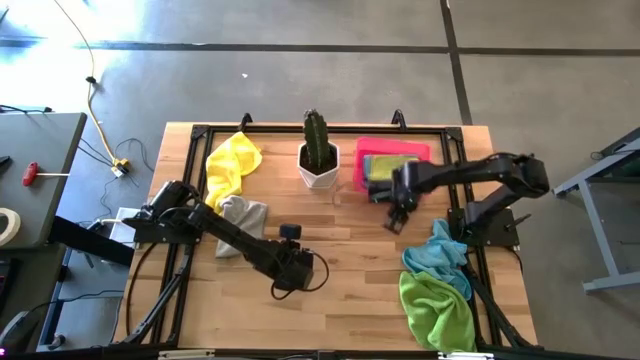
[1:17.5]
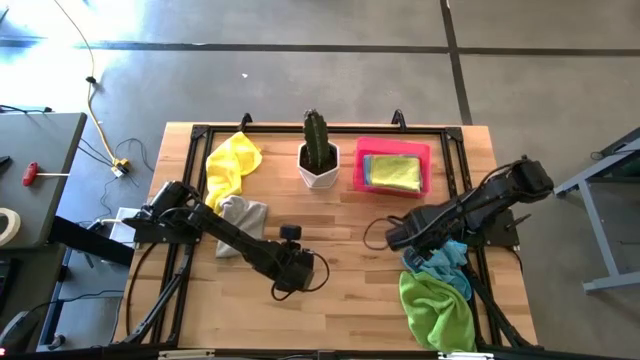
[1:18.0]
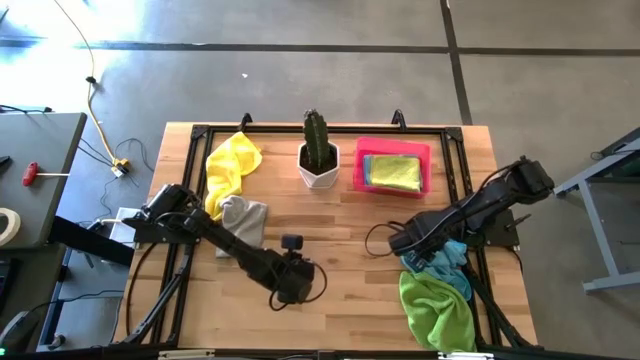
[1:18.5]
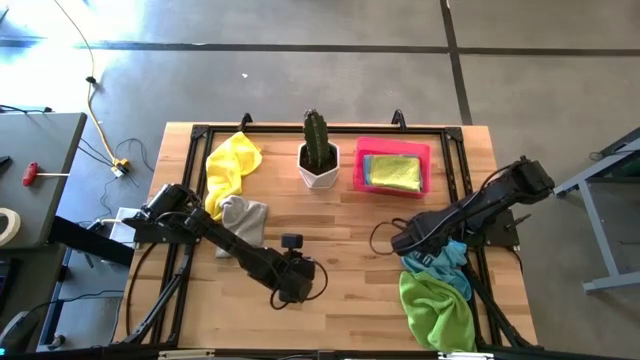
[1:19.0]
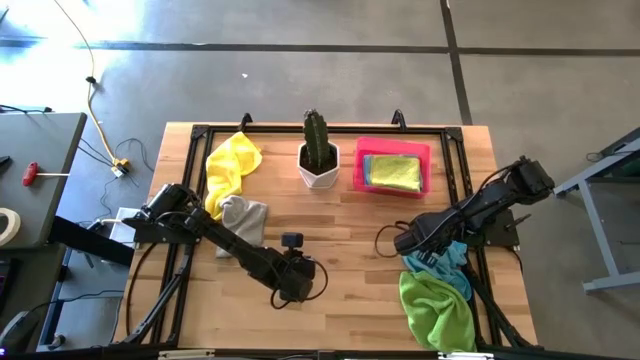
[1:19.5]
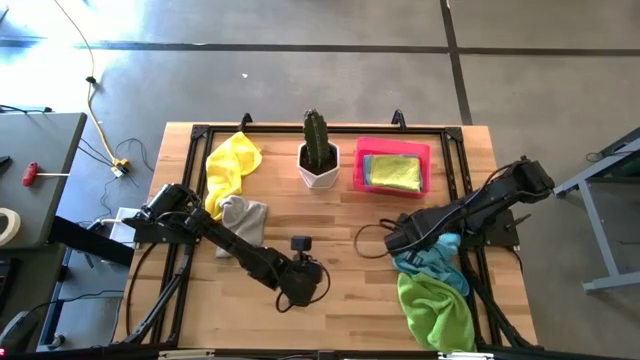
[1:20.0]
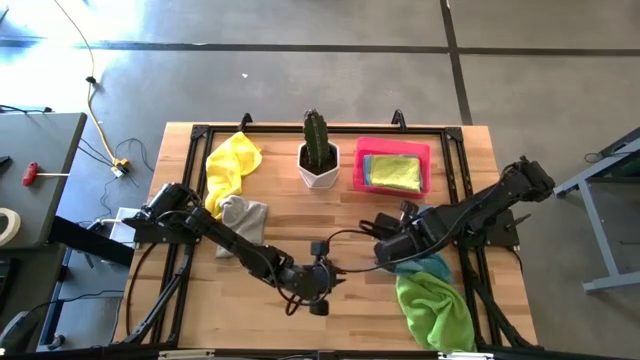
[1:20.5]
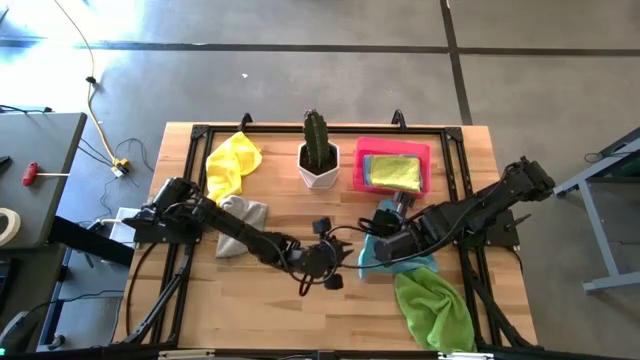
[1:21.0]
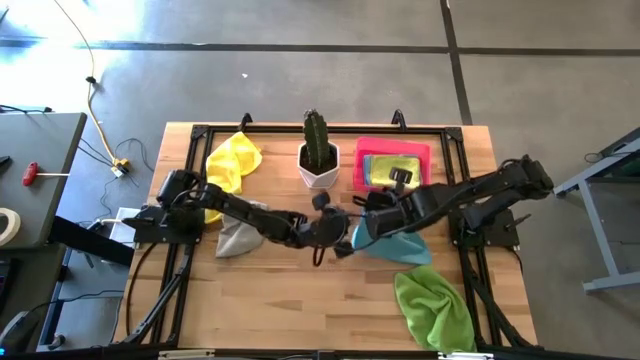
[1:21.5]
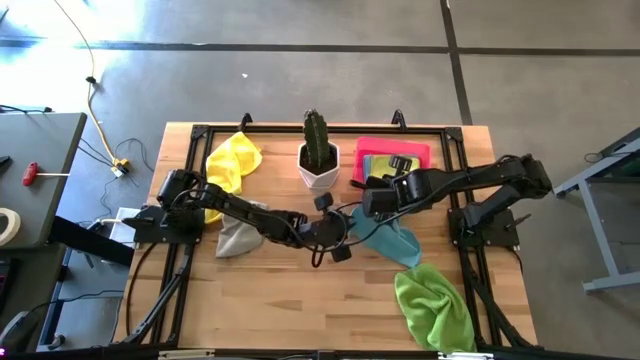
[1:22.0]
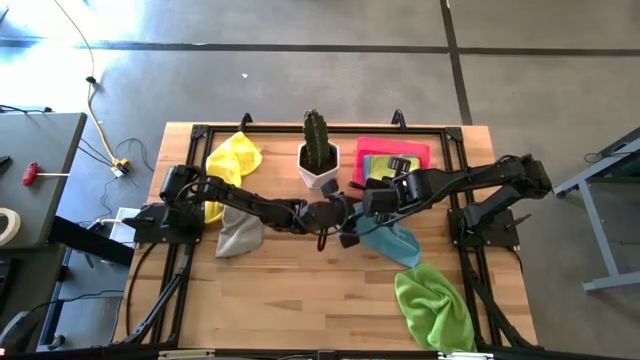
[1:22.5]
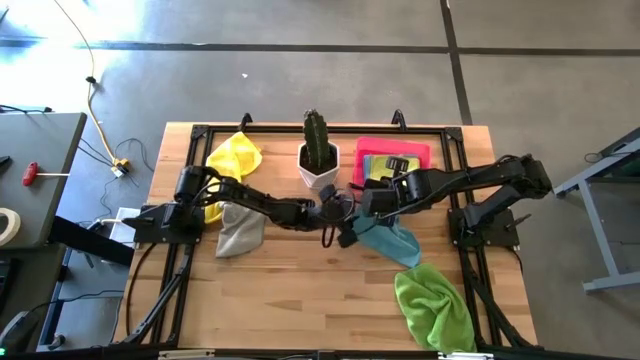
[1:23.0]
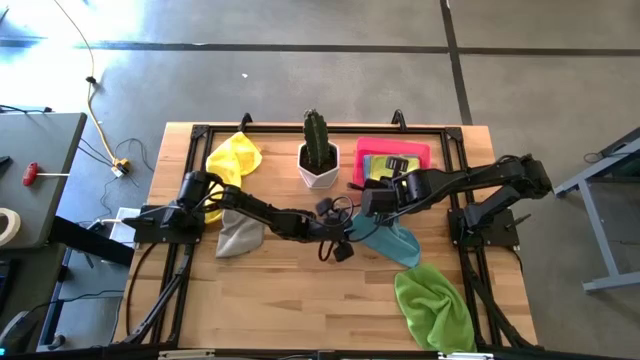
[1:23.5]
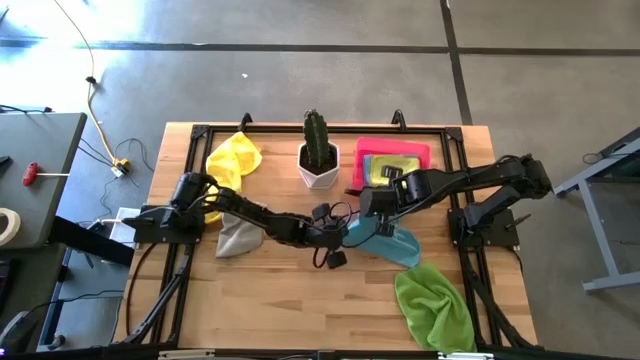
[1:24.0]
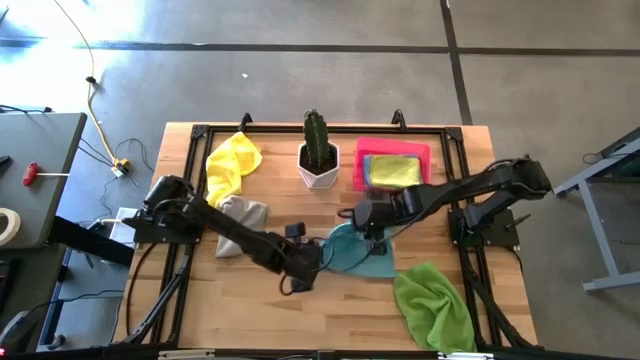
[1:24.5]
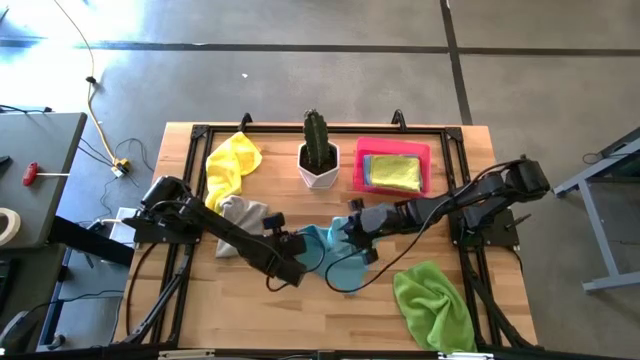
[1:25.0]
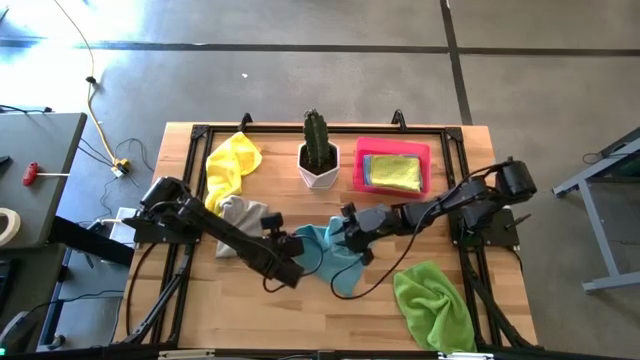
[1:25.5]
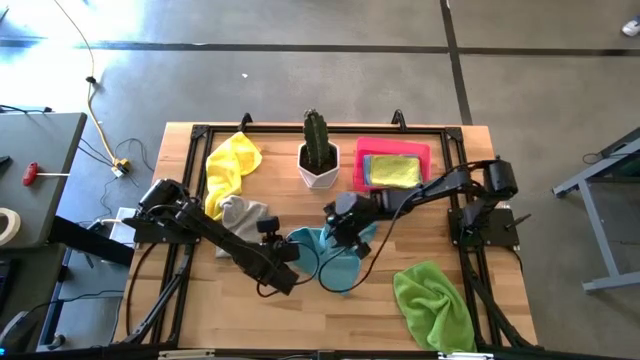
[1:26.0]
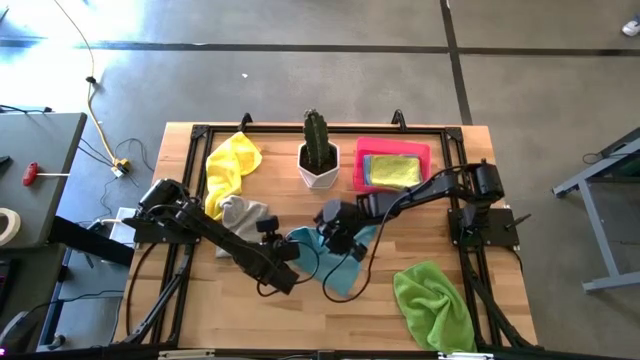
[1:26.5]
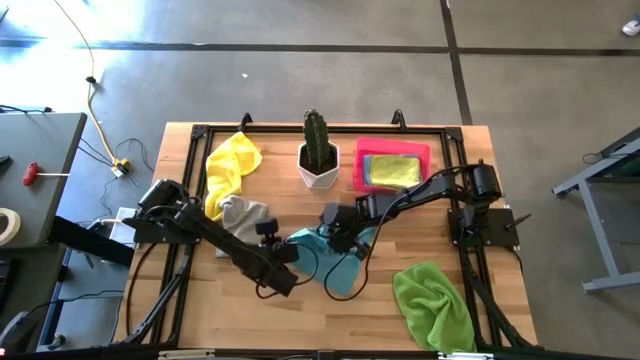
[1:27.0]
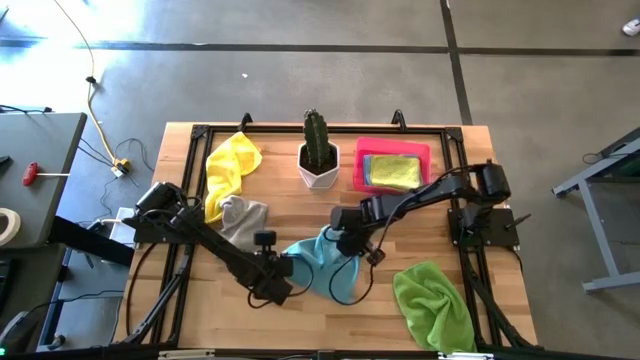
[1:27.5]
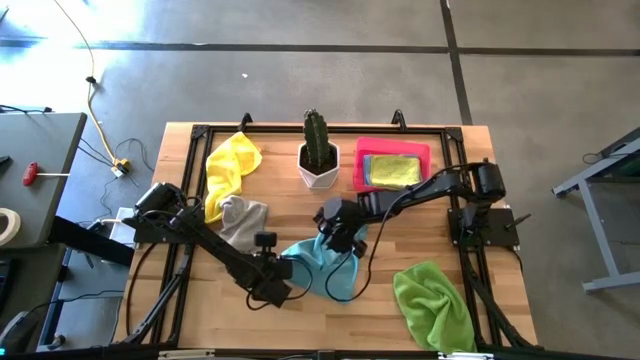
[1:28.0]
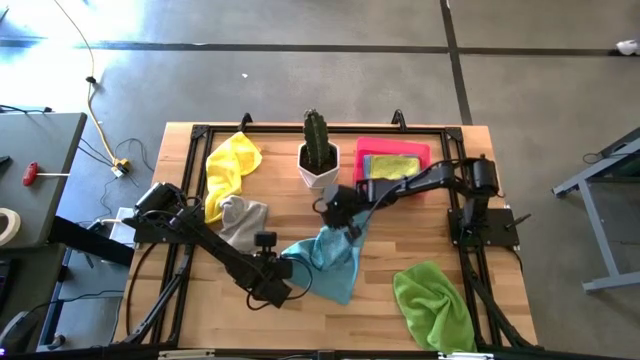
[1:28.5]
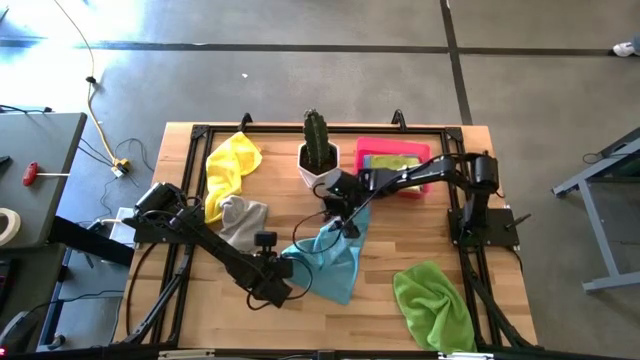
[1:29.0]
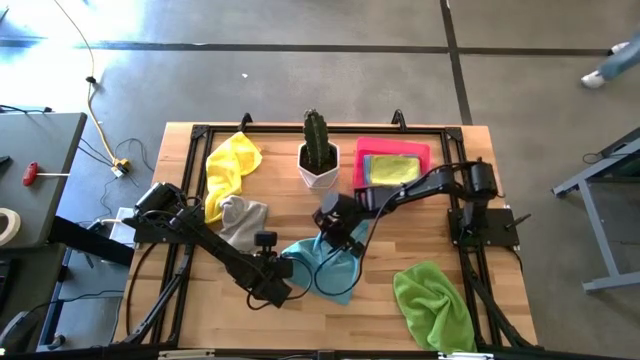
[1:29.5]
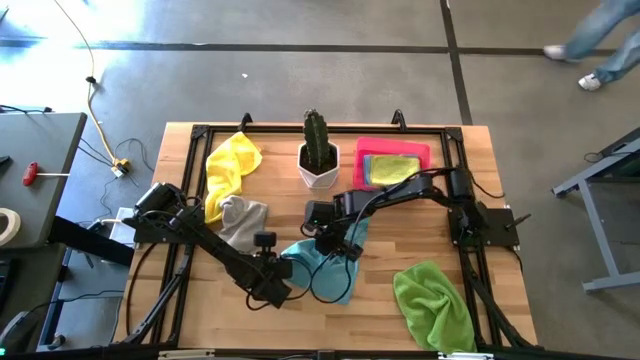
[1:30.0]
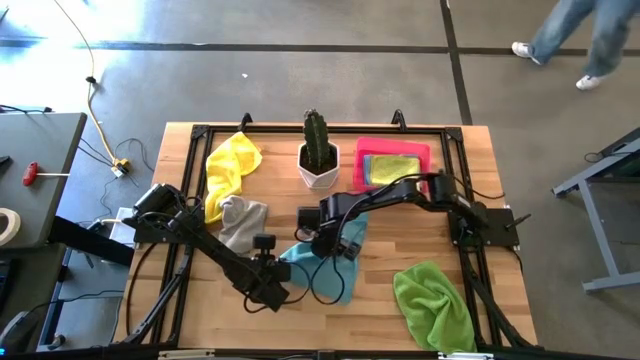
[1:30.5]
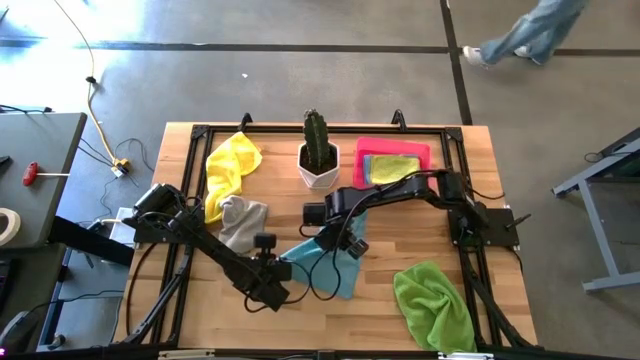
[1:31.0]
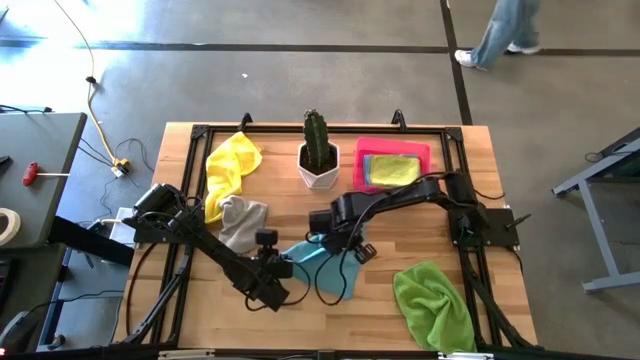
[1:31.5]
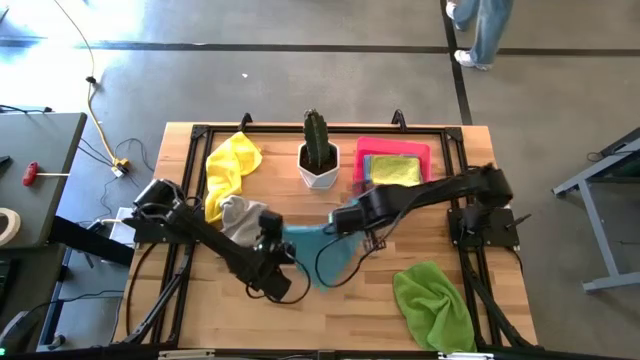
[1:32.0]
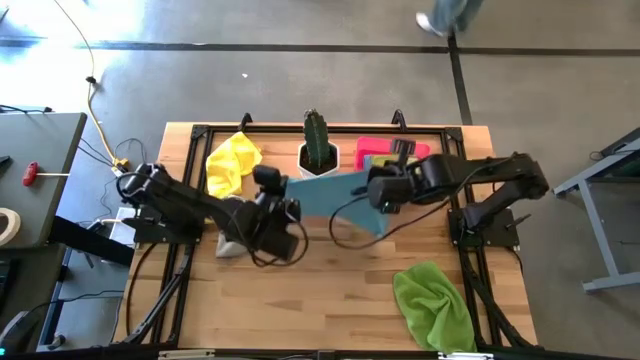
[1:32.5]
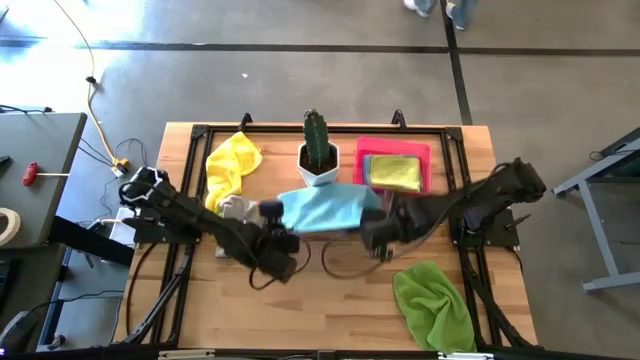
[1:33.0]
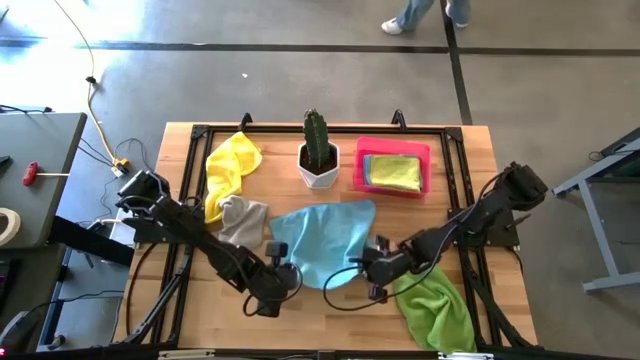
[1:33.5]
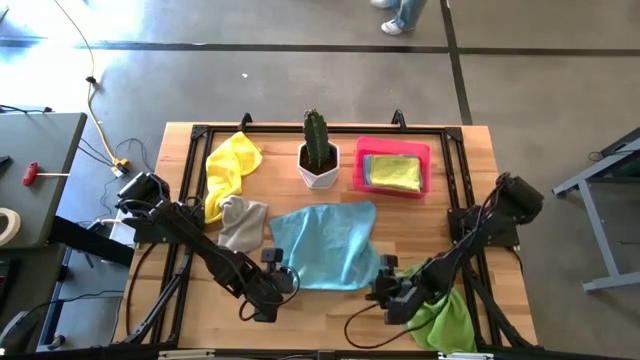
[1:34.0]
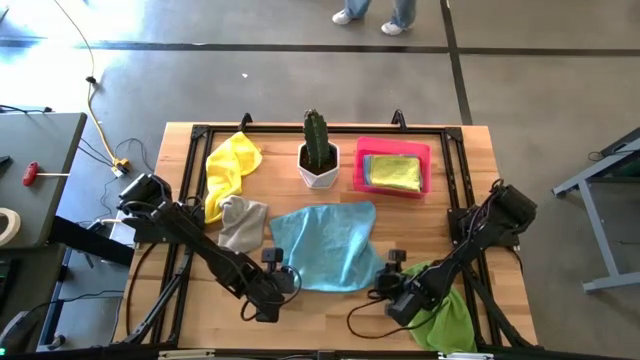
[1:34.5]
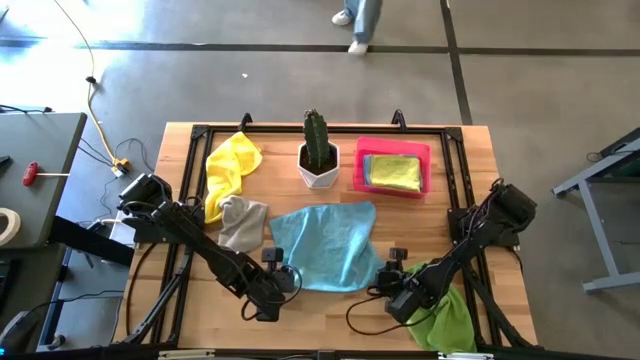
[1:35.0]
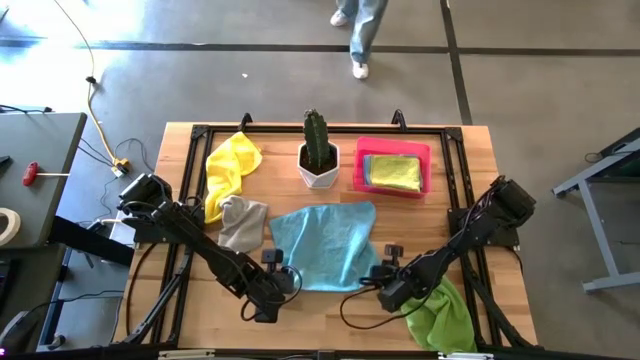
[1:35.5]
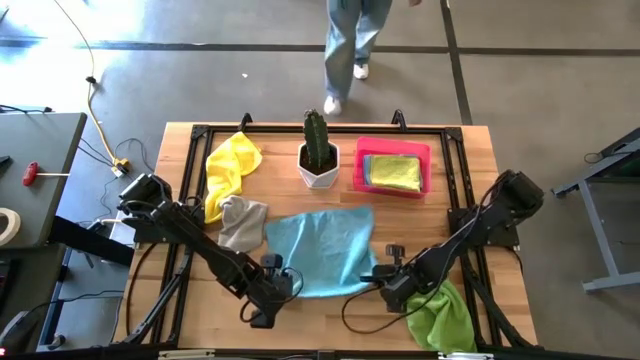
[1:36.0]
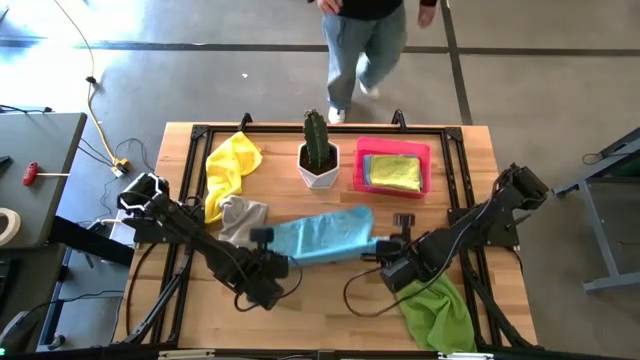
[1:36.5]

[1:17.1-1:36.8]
Task: Fold microfiber towels
Put the blue towel into the pink laundry bin

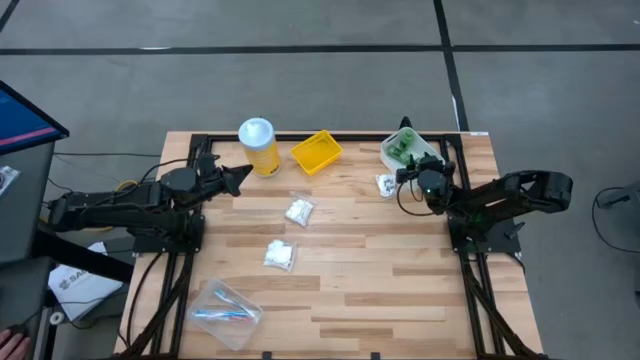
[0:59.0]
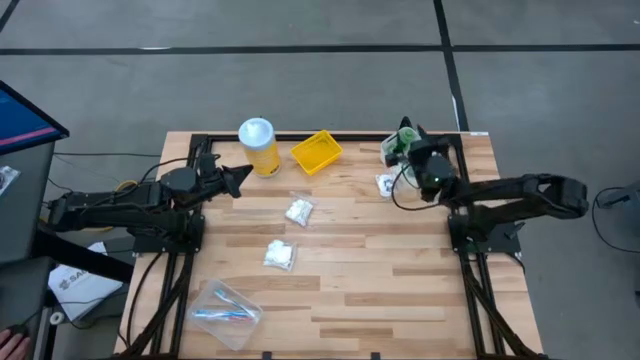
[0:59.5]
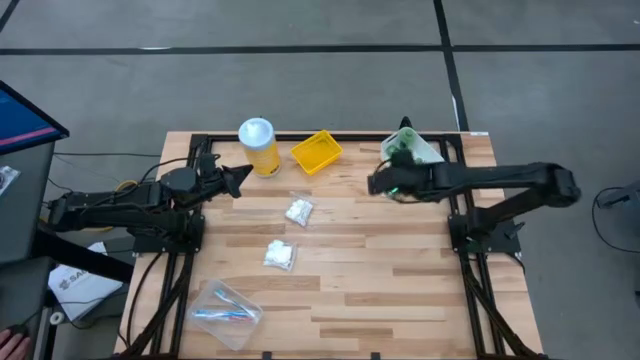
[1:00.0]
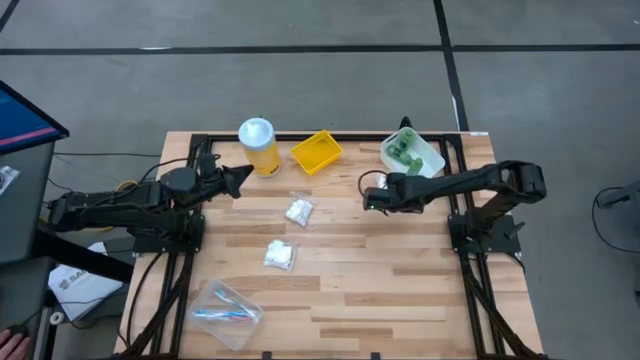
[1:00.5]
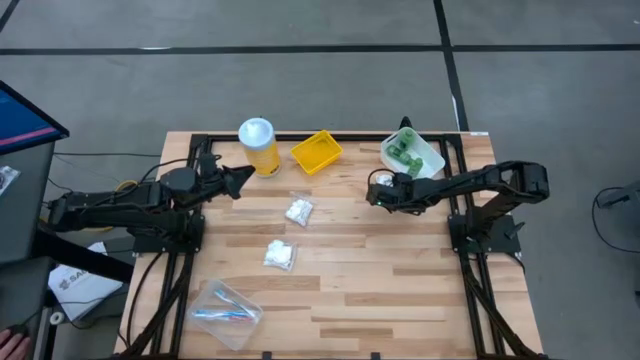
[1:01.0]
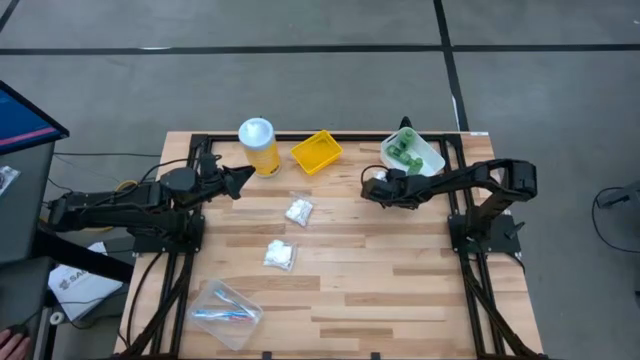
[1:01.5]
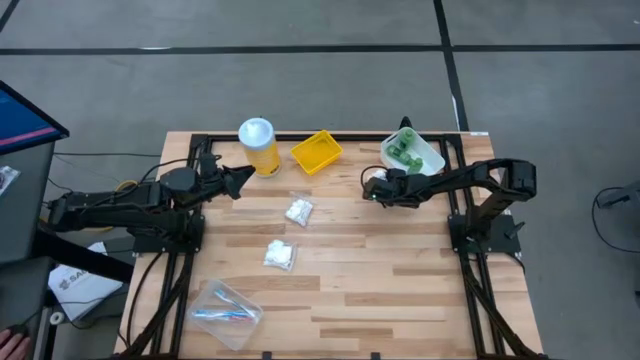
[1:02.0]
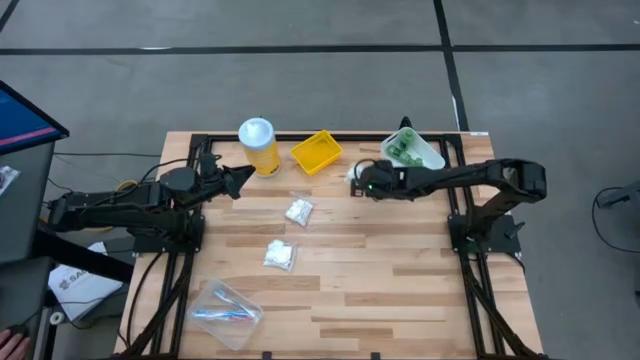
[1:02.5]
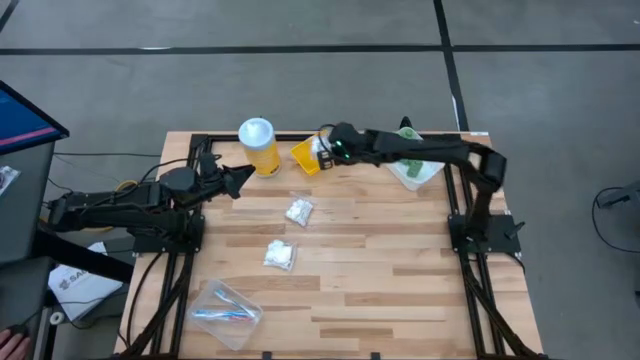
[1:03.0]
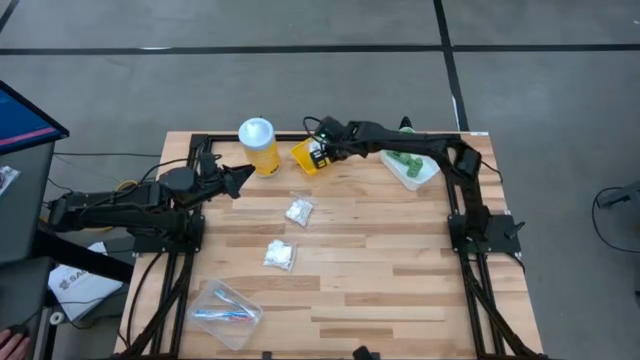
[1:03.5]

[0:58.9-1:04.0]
Task: Pick & Place Travel size toiletries
Put the cotton pack into the yellow bin
